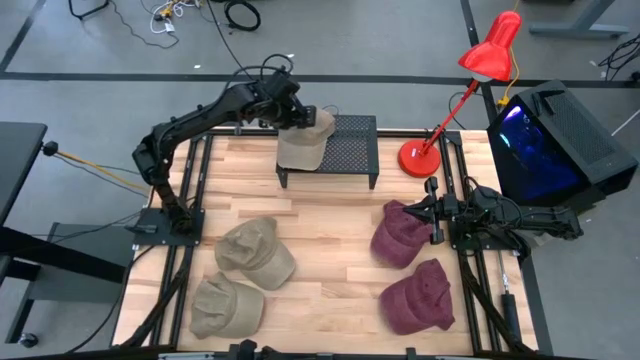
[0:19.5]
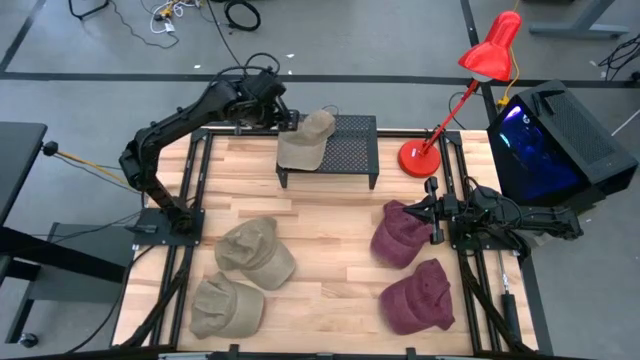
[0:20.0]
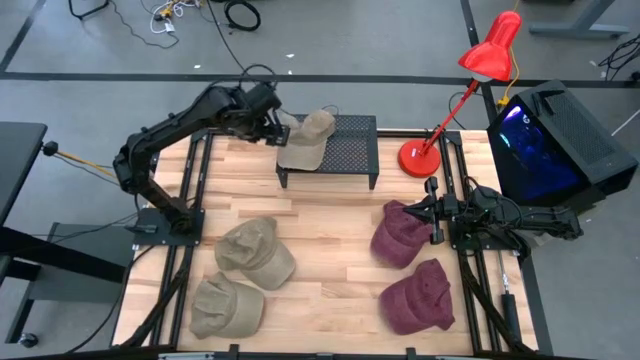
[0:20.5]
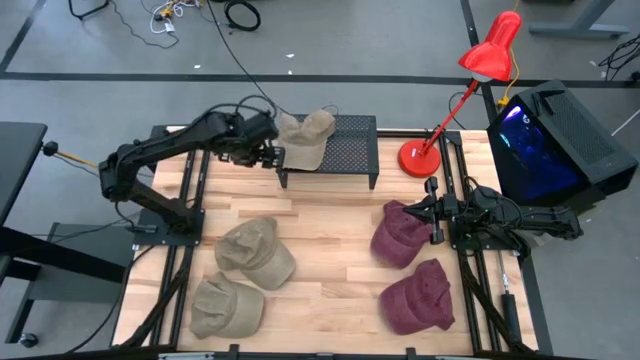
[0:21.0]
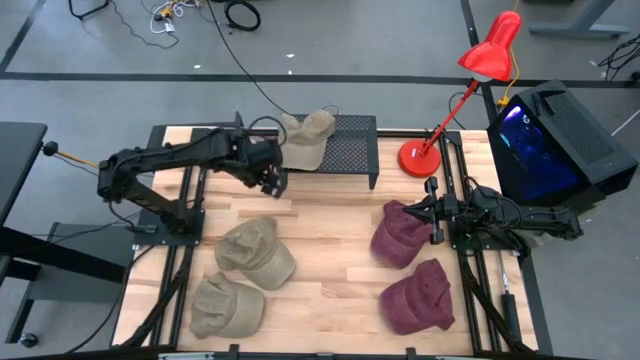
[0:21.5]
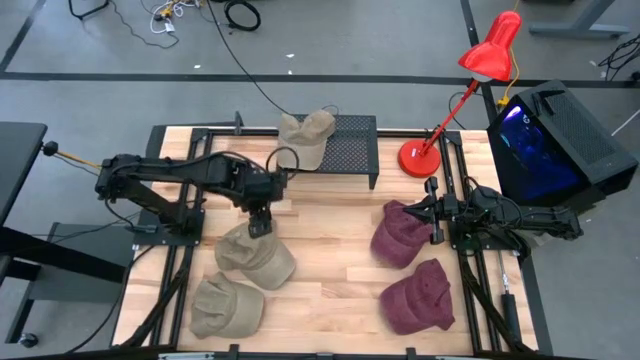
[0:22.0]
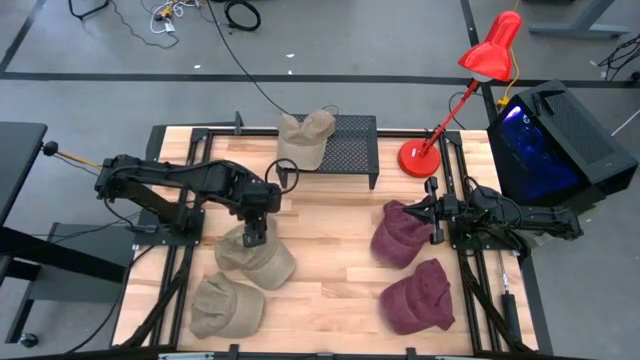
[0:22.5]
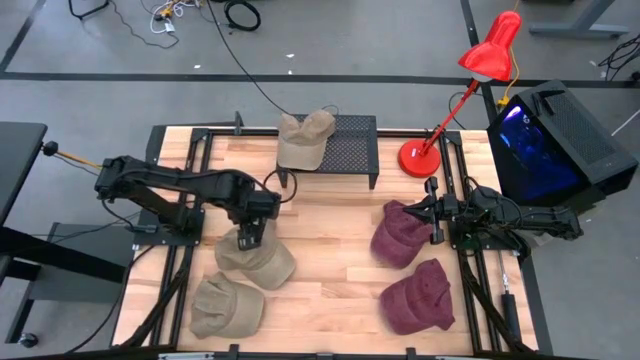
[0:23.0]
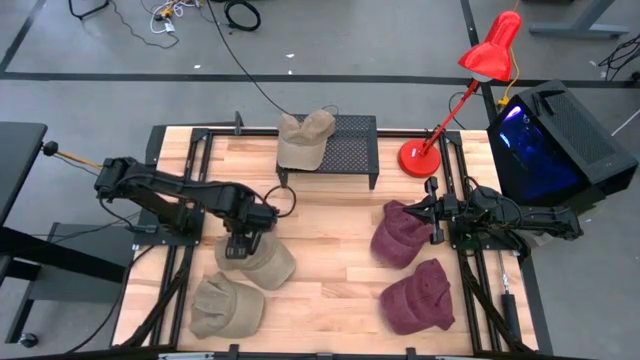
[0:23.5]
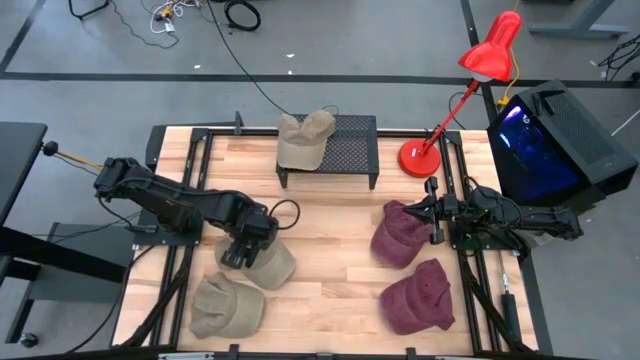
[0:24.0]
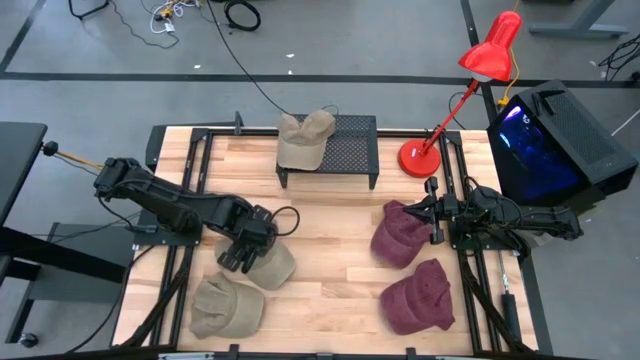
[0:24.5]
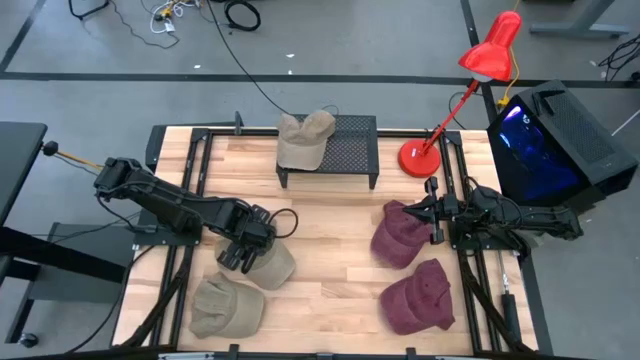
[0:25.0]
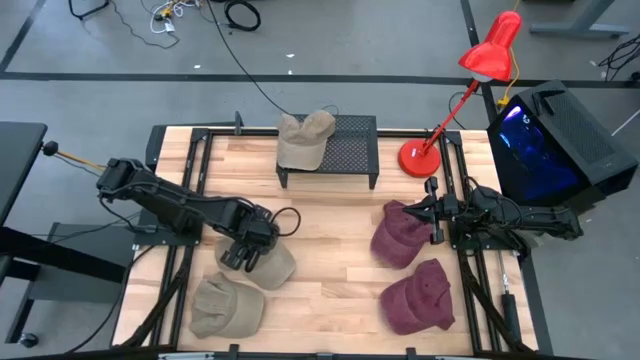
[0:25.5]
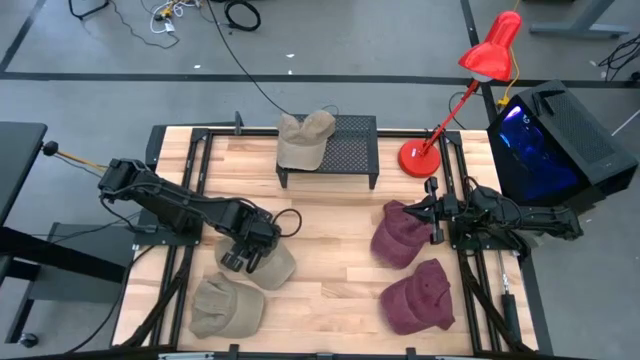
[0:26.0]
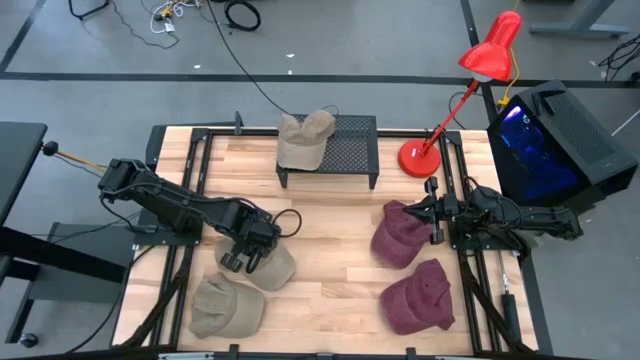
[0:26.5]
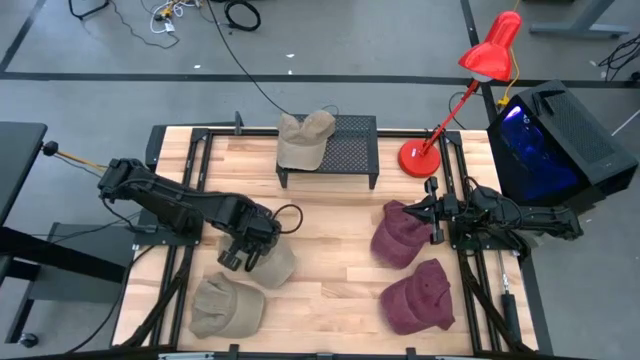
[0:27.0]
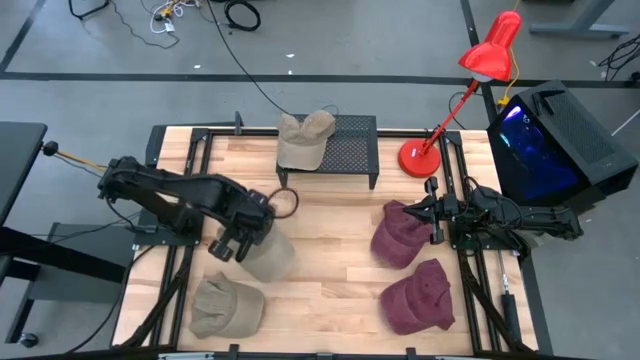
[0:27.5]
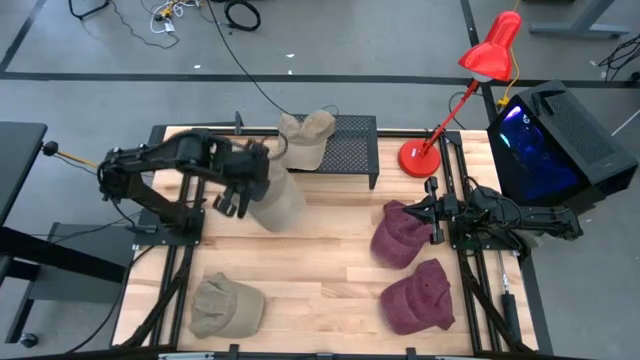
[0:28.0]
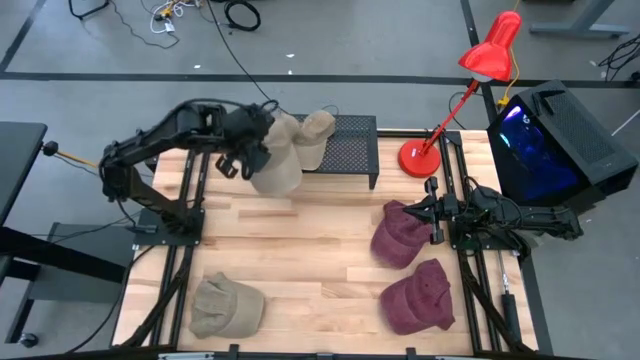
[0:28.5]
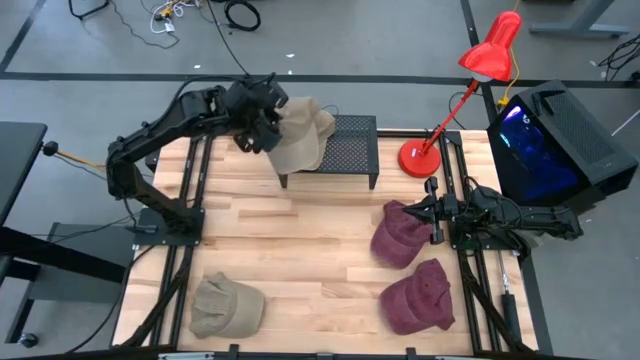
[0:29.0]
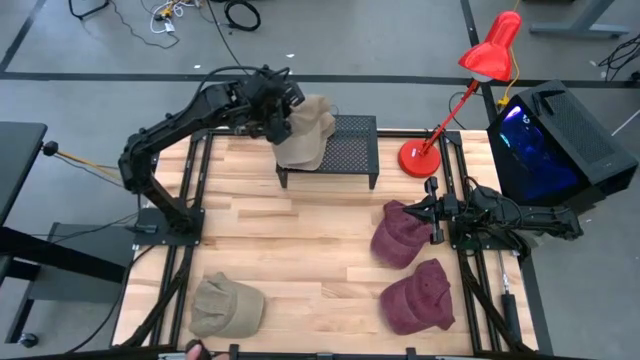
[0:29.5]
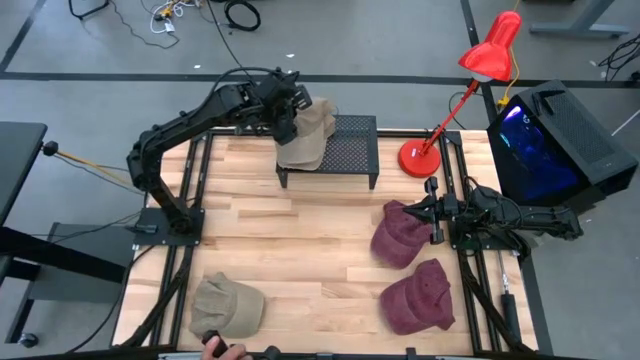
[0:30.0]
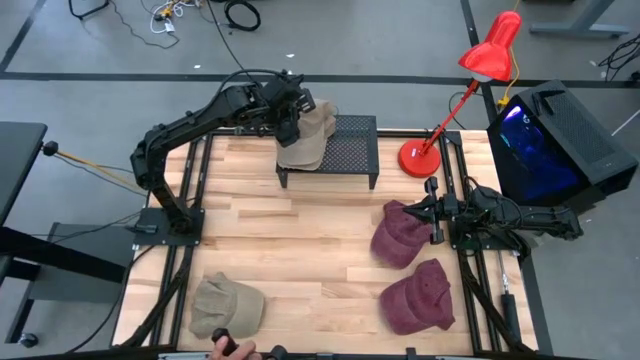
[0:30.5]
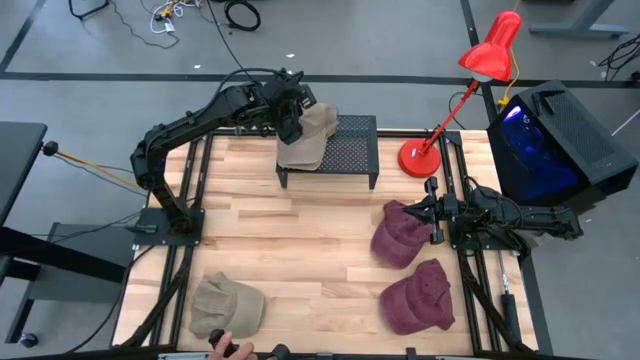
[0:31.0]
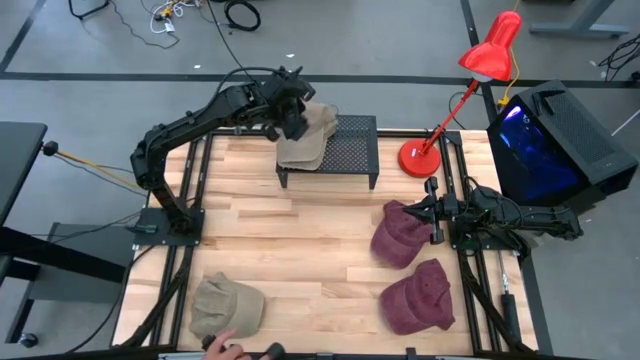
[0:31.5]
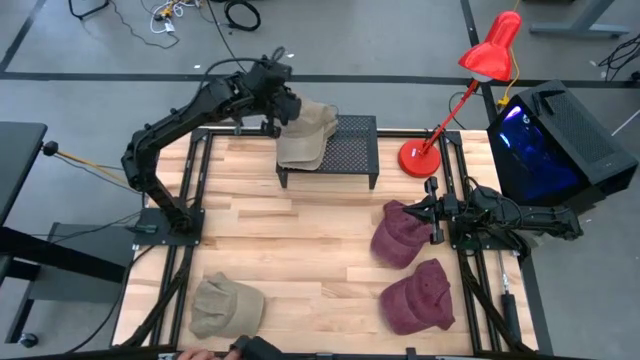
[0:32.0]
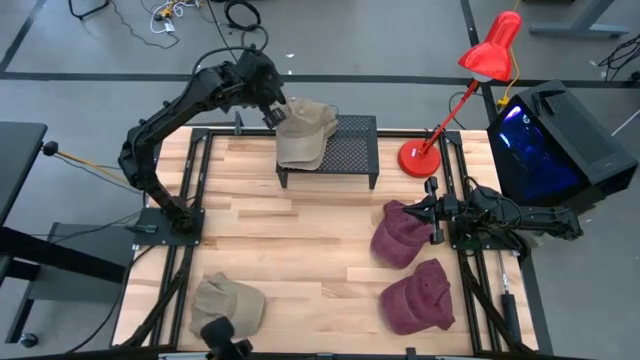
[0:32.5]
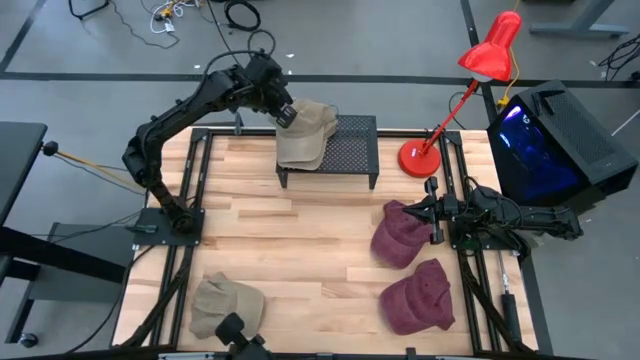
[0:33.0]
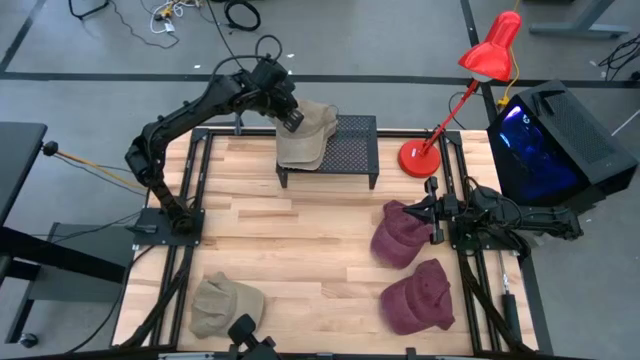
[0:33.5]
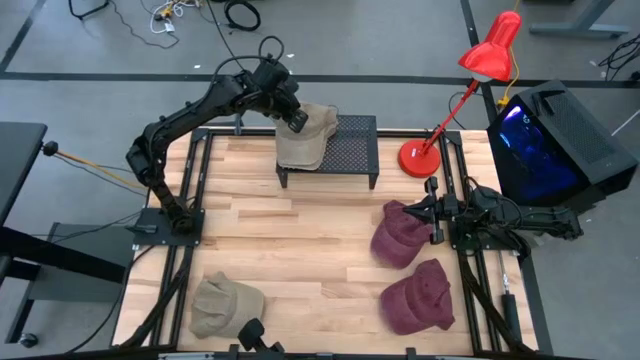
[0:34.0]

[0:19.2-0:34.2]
Task: Pick & Place hat
Stack the top brown cap on top of the other brown cap on the shelf

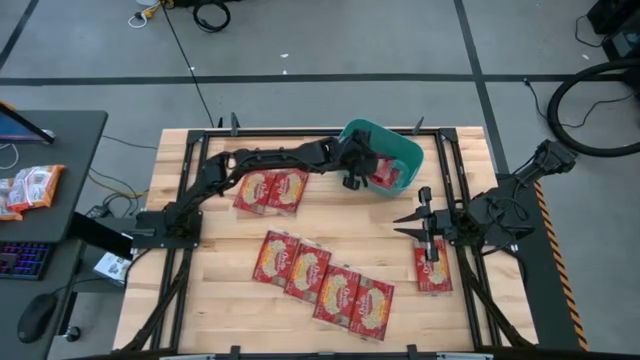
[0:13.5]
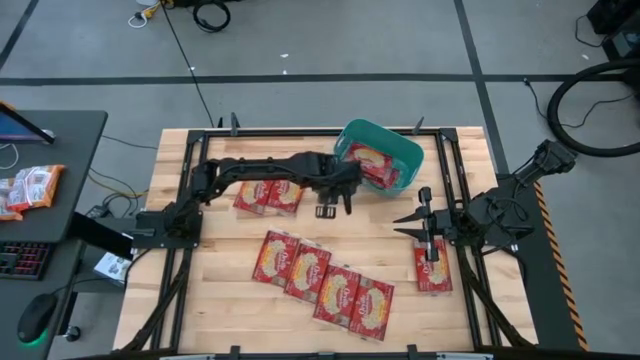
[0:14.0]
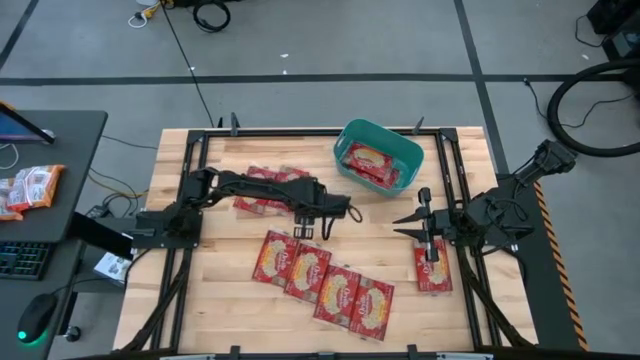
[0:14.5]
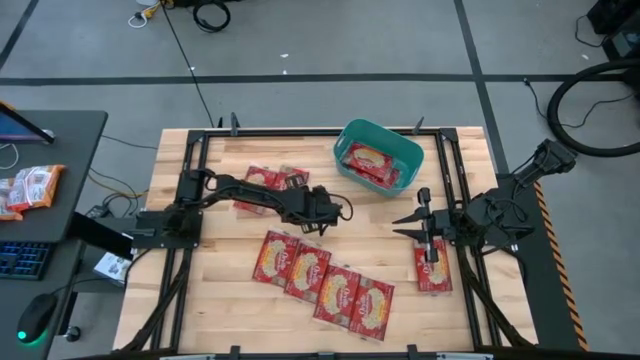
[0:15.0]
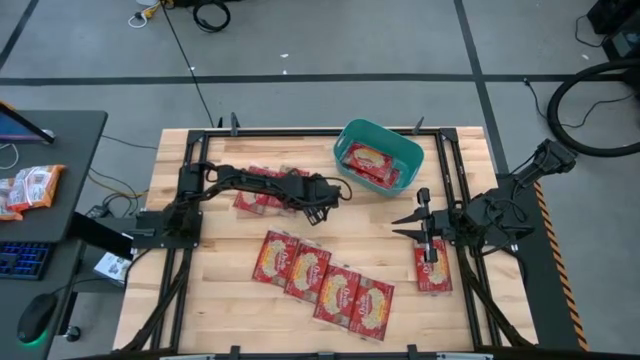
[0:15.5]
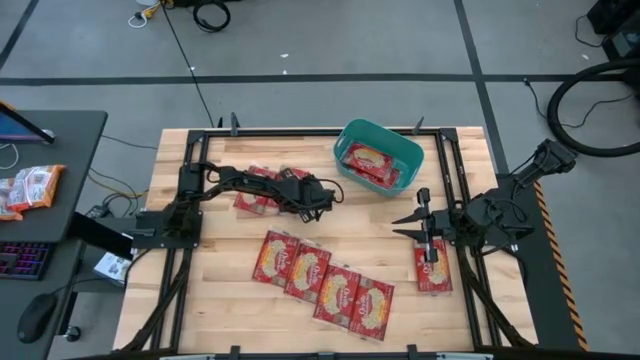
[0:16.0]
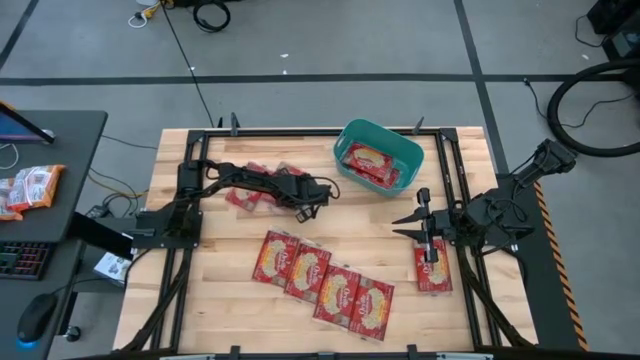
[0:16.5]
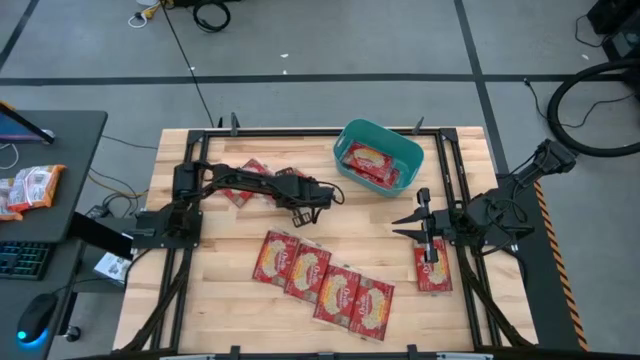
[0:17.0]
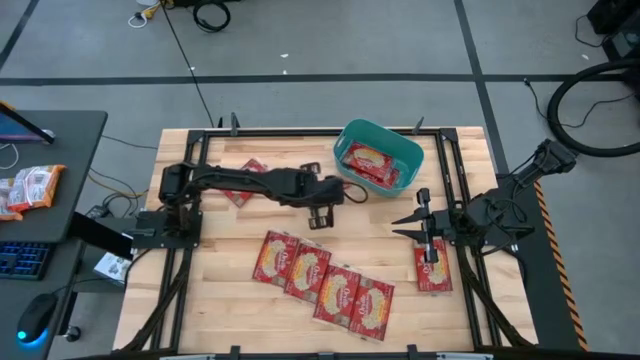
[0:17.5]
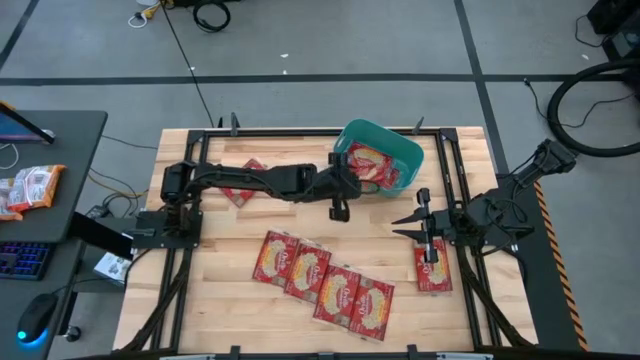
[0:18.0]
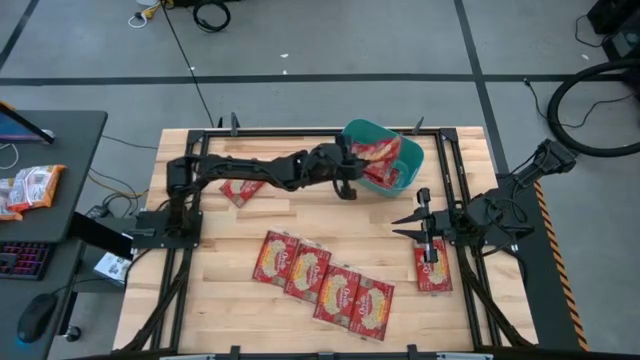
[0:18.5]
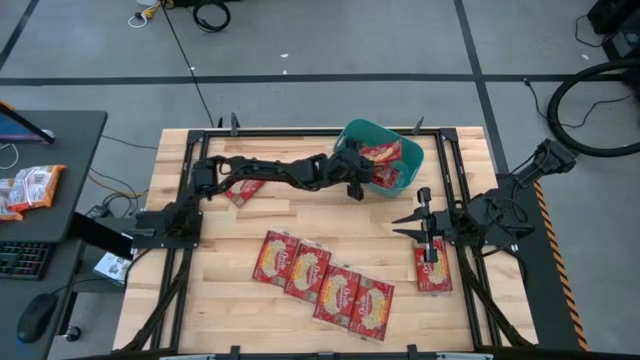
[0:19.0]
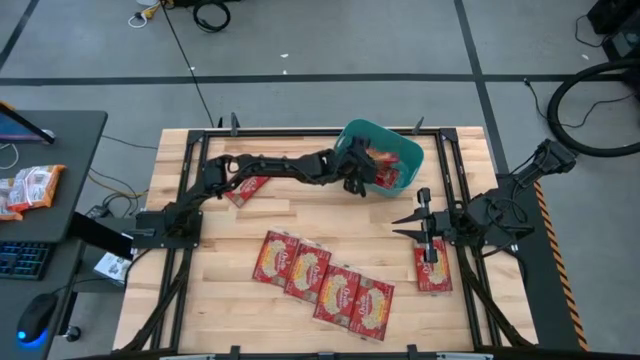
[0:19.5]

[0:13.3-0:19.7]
Task: Sort popcorn bags into baskets
Put the popcorn bag into the bin
